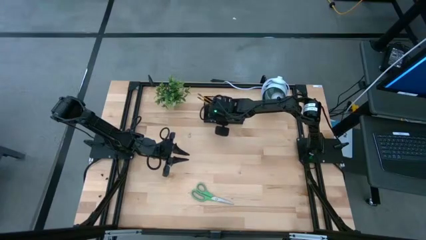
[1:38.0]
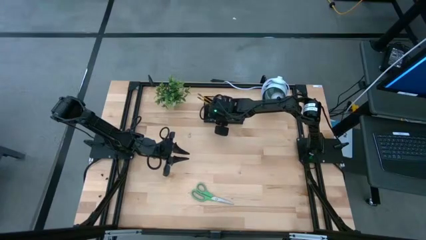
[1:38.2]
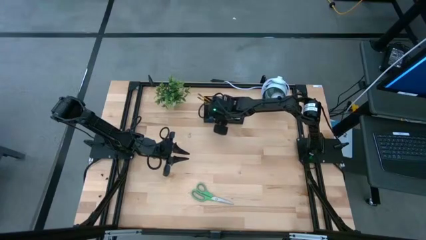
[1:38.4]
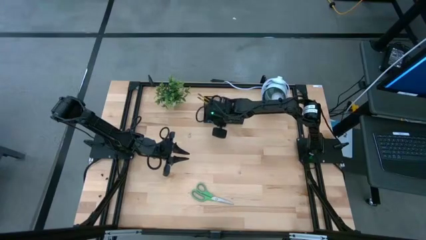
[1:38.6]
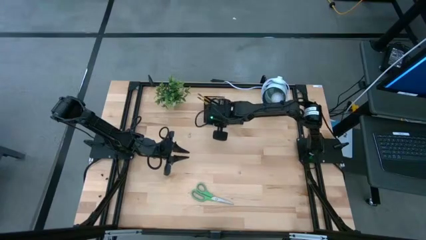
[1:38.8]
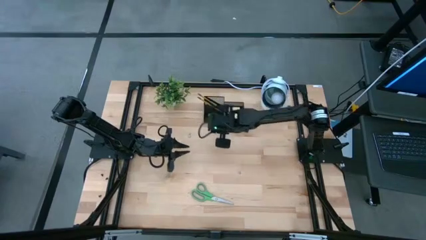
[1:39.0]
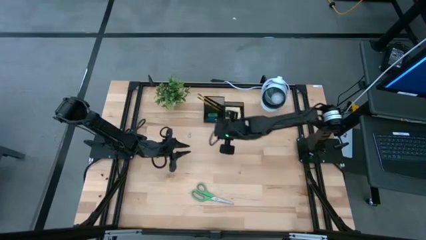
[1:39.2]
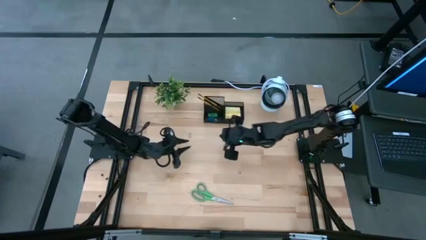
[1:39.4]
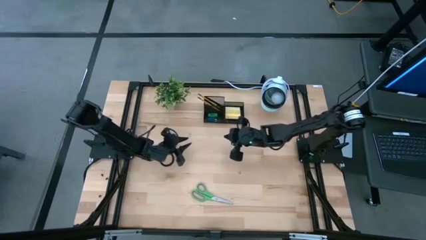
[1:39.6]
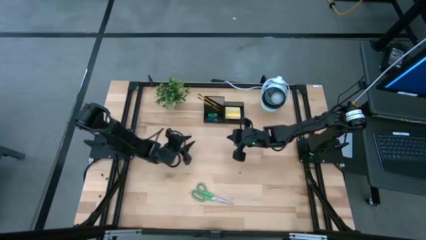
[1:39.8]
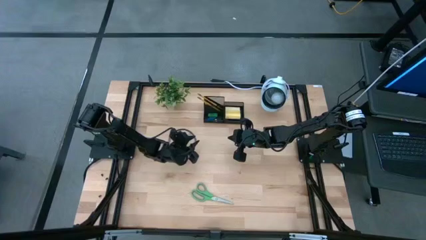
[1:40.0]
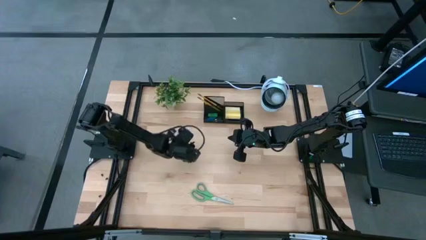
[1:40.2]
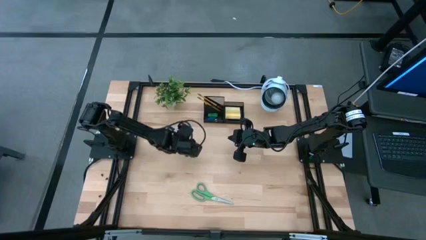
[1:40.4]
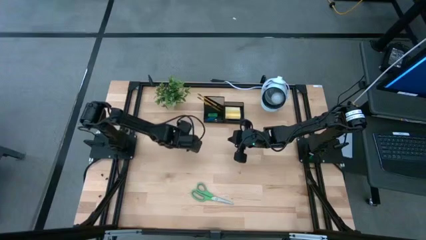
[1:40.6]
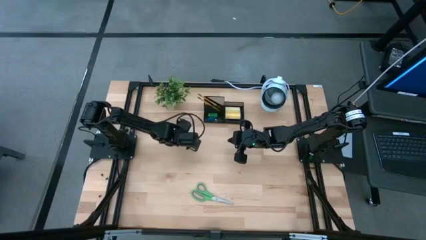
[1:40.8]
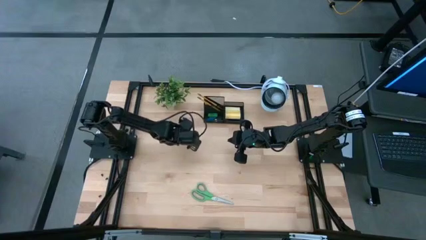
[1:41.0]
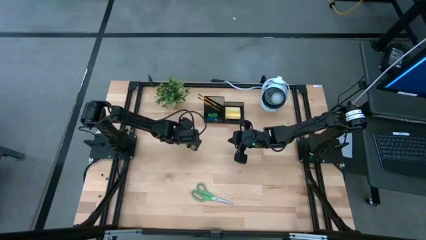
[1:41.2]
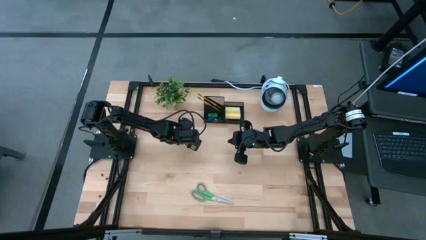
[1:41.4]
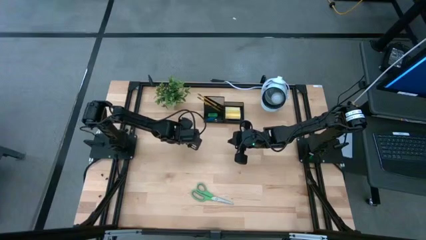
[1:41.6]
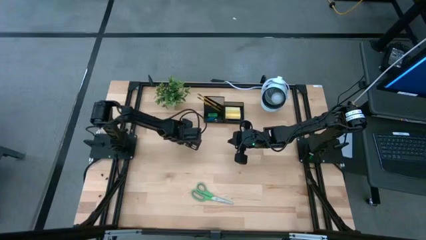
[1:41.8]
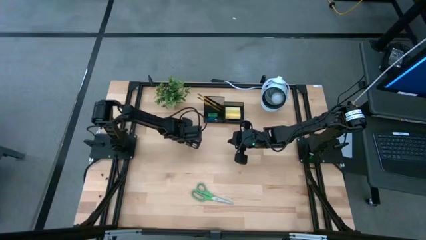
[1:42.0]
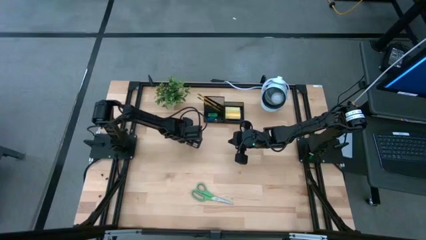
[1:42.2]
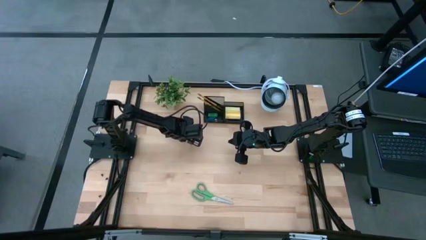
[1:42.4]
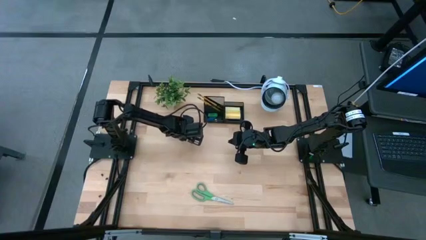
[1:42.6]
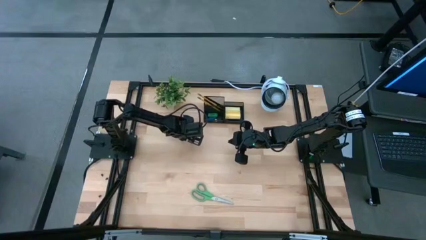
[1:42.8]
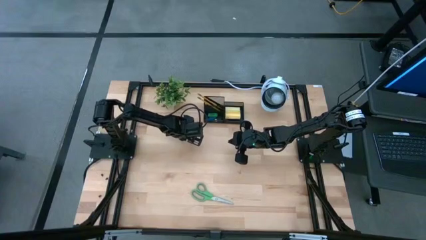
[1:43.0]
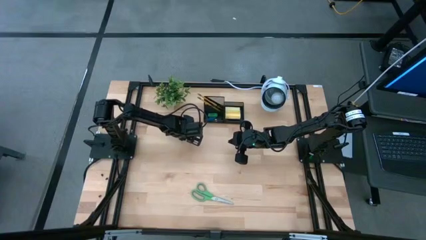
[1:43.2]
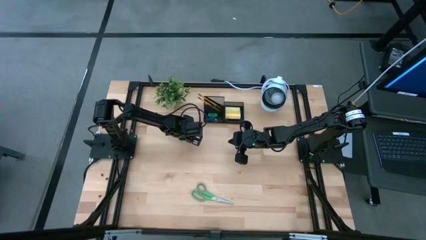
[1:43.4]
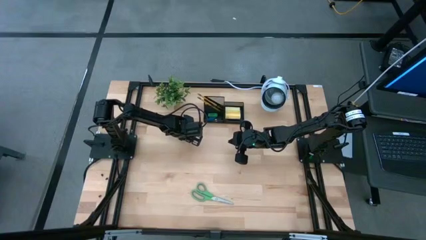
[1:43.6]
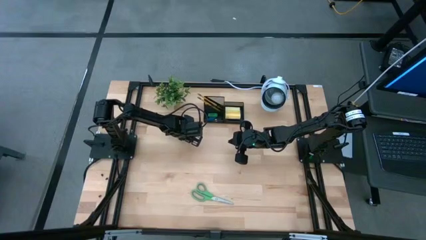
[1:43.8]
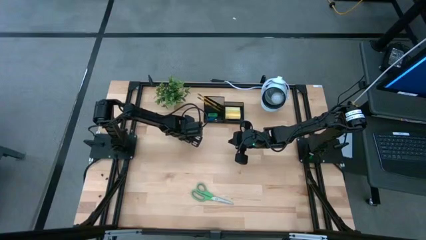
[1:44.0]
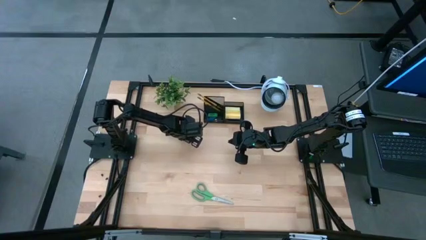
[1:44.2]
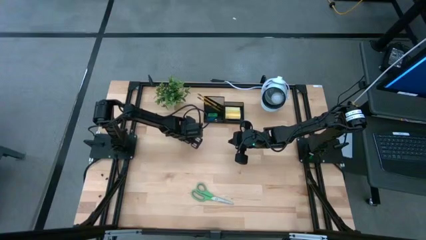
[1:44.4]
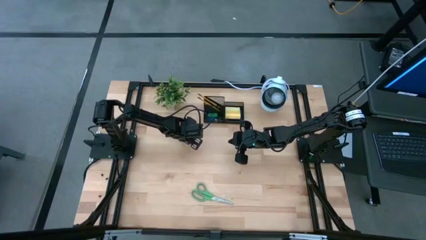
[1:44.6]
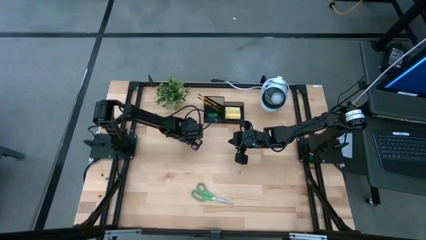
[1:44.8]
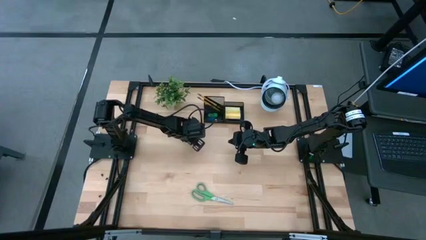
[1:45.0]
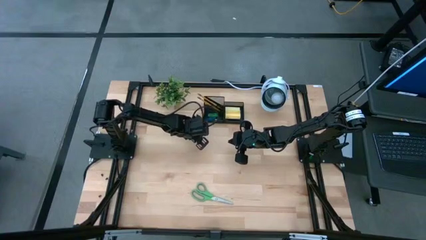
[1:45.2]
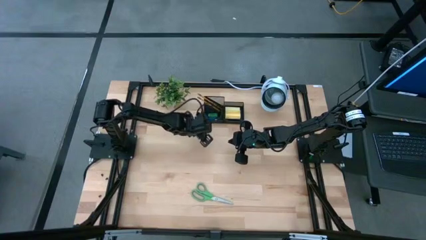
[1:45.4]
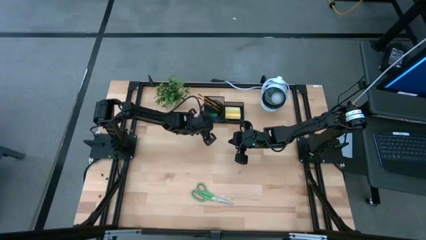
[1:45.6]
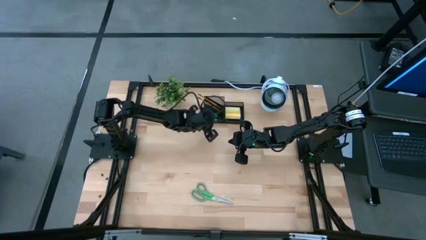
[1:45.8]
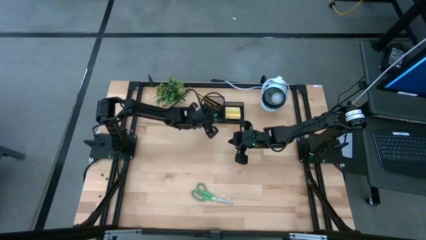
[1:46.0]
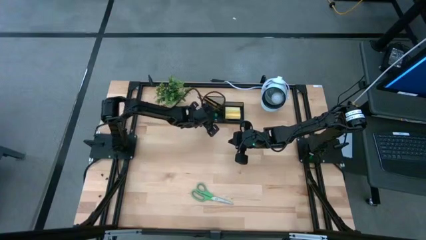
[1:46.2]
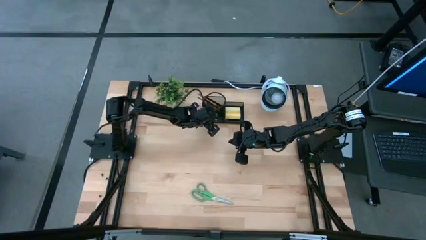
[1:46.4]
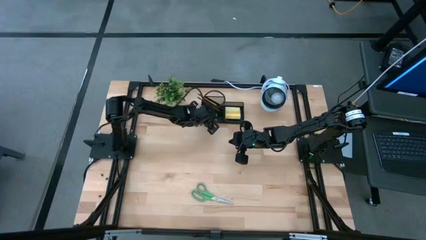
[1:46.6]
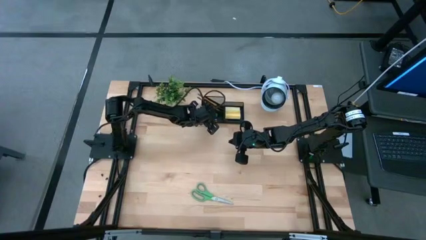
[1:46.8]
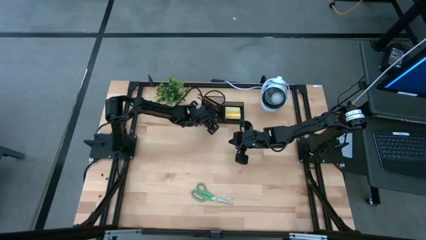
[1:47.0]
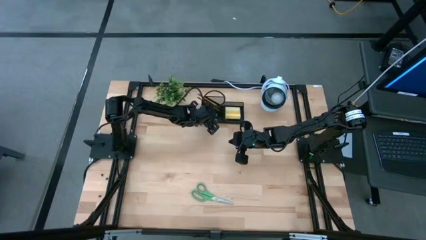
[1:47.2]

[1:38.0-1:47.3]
Task: Pick and place office supplies into organizer
Put the yellow binder clip into the black organizer

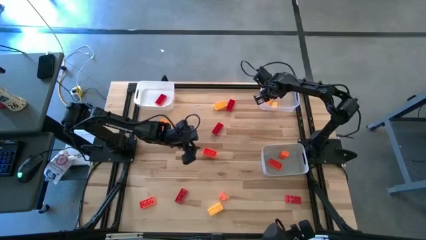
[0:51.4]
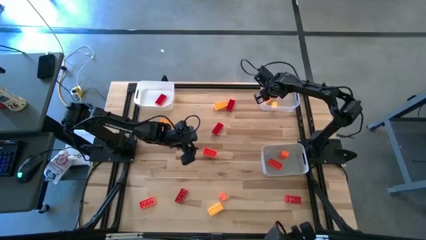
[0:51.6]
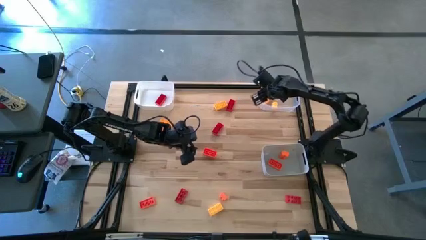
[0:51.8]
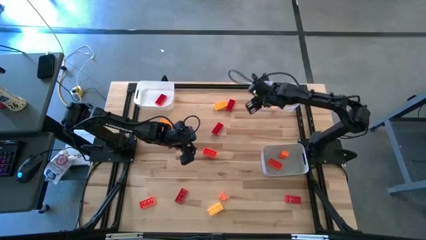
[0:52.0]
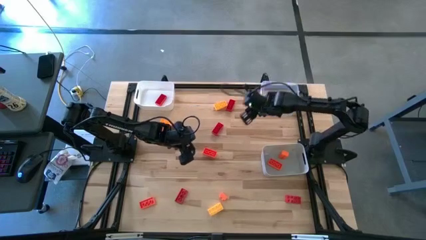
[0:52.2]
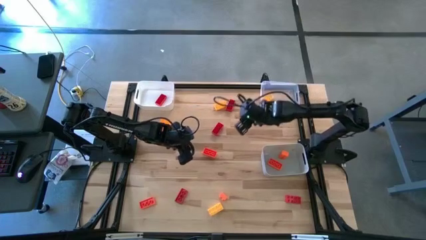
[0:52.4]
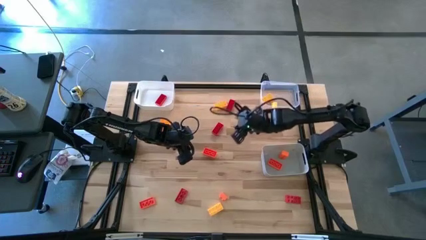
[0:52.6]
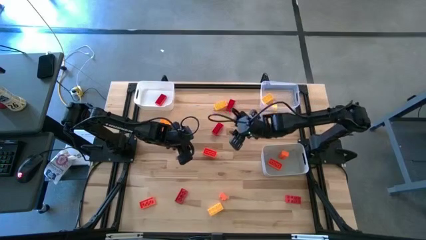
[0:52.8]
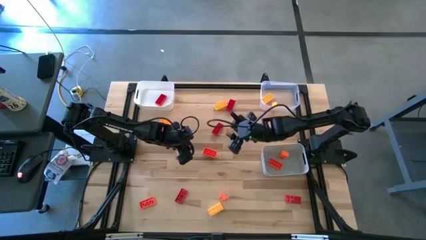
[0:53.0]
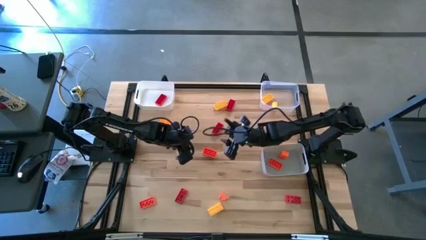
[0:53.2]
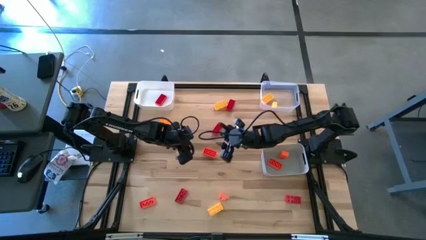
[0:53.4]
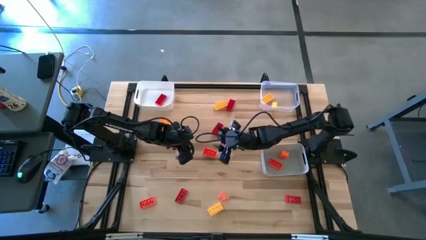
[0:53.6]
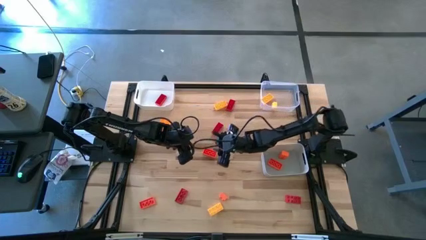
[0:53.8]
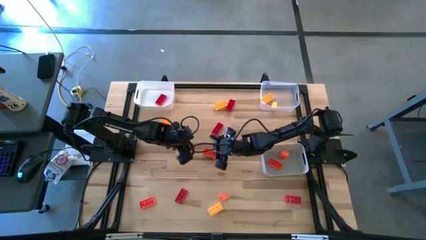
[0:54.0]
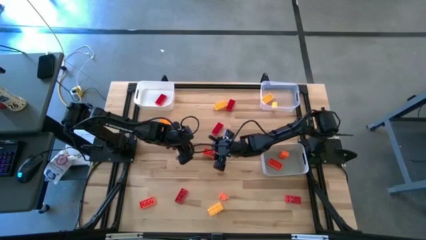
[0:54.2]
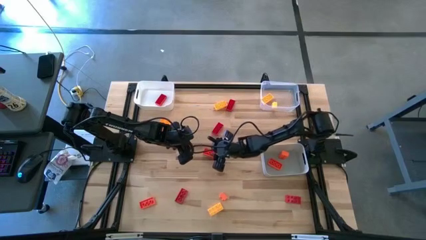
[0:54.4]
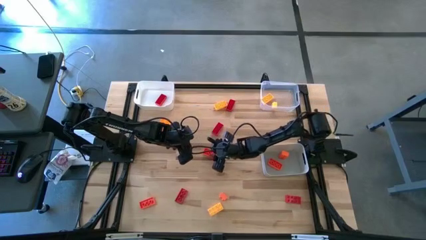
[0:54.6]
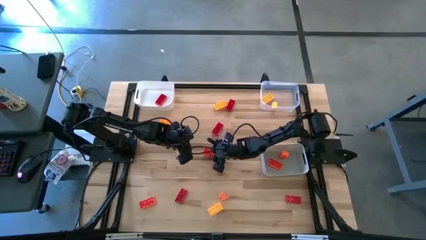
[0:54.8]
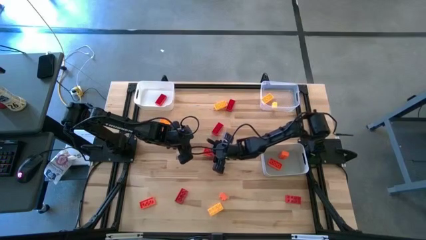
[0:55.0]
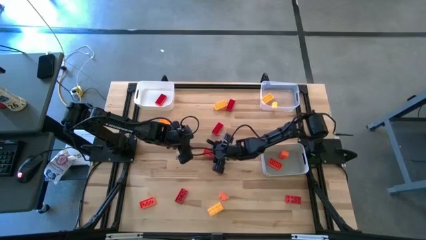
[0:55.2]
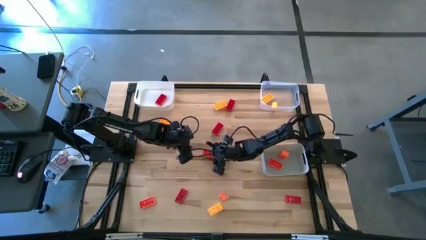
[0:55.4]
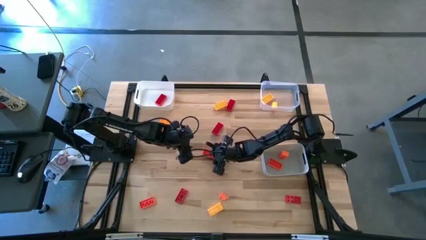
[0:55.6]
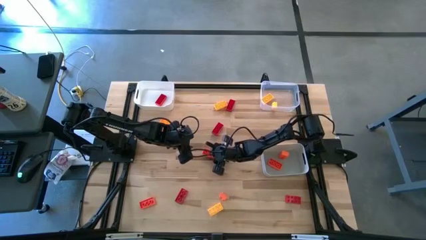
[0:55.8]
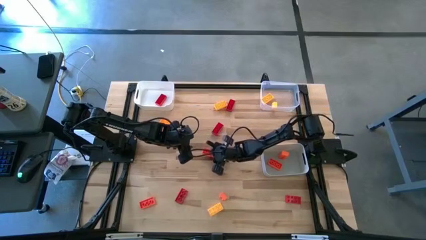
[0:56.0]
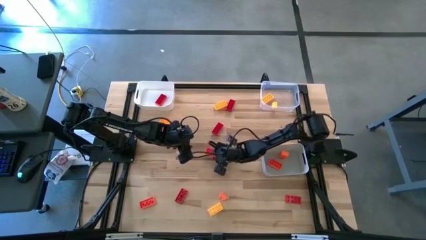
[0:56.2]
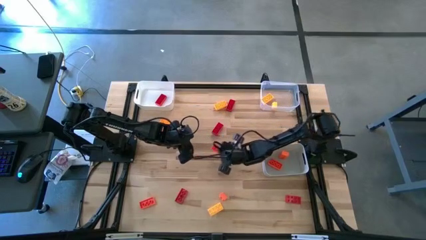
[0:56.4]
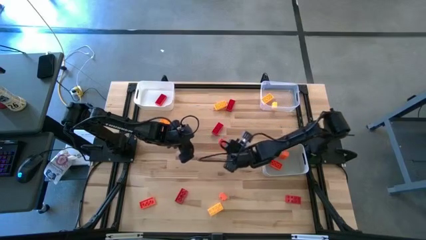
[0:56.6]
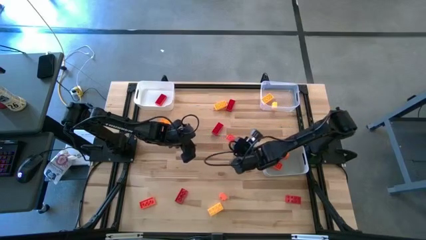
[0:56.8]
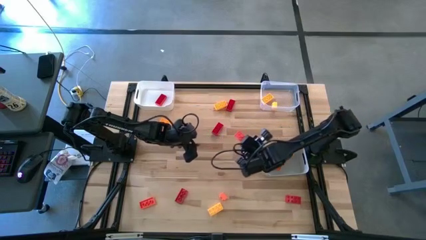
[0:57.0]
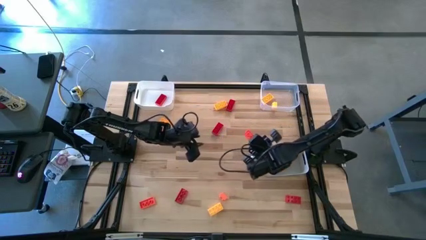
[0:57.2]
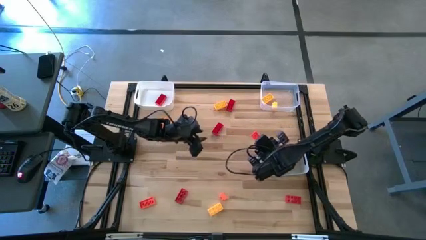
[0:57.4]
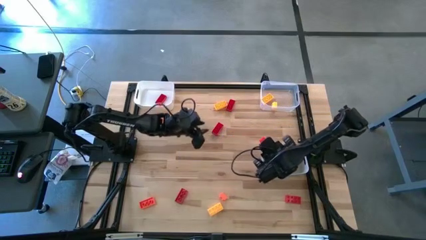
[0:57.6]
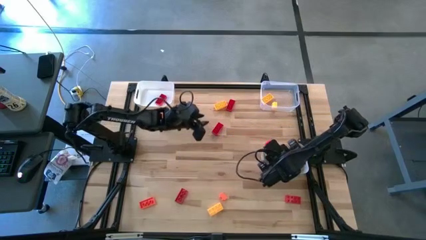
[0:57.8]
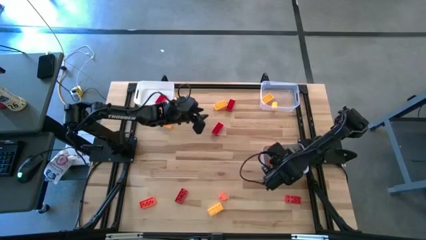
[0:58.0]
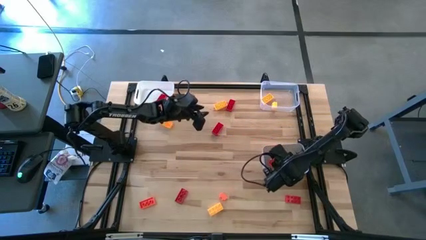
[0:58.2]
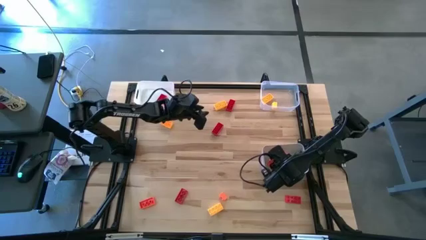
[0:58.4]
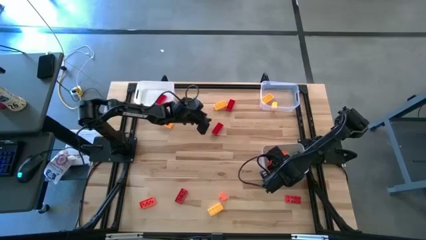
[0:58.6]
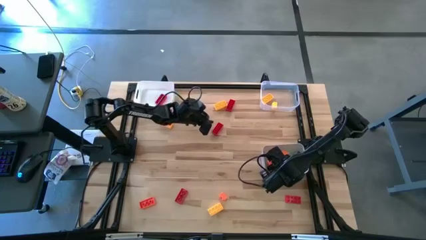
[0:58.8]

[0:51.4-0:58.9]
Task: Sort & place blocks by color
Put the orange game piece into the gray bin
